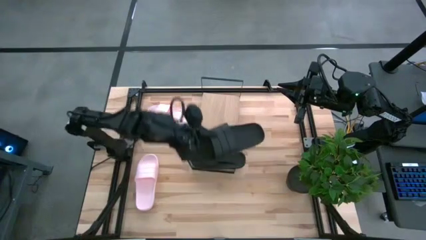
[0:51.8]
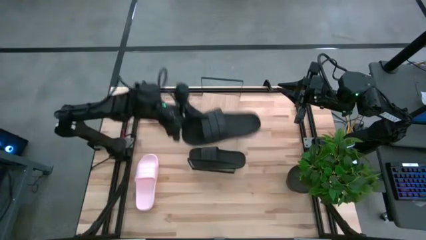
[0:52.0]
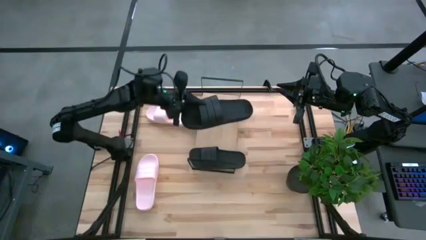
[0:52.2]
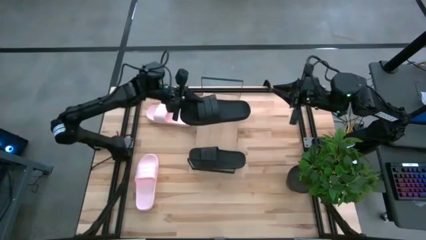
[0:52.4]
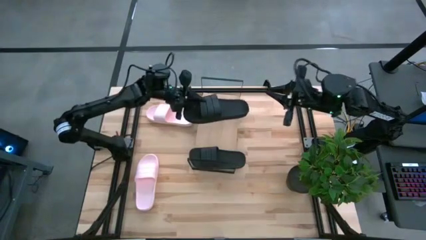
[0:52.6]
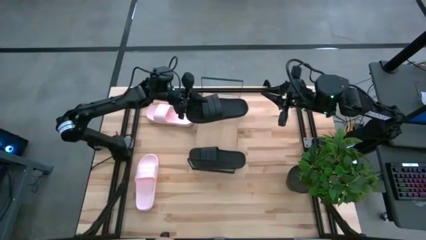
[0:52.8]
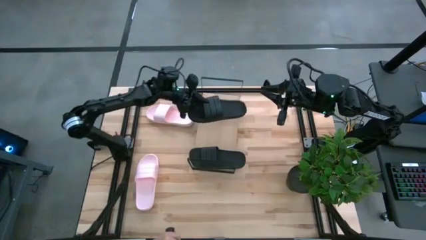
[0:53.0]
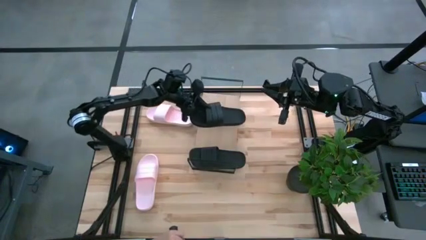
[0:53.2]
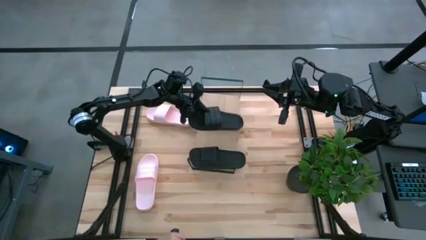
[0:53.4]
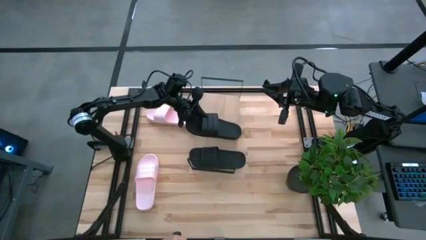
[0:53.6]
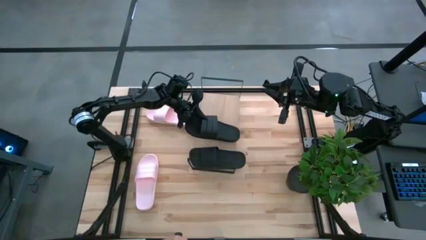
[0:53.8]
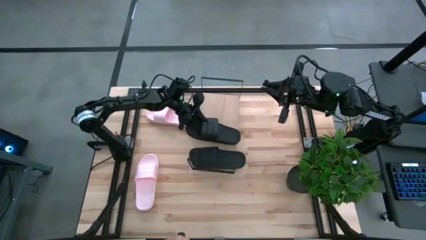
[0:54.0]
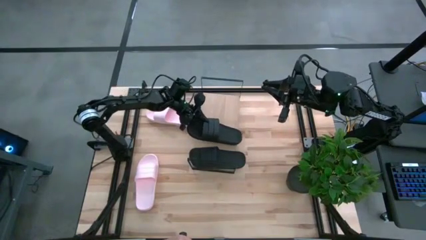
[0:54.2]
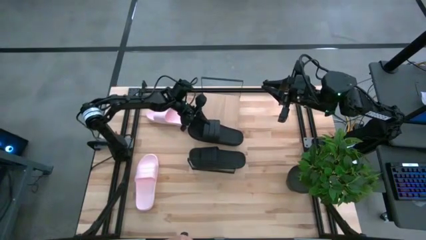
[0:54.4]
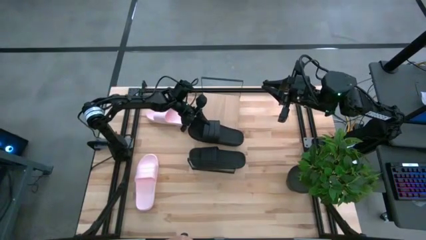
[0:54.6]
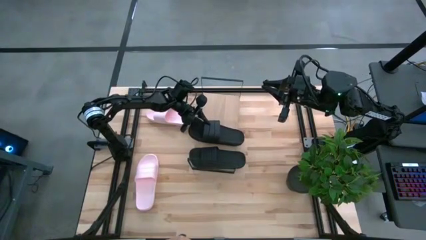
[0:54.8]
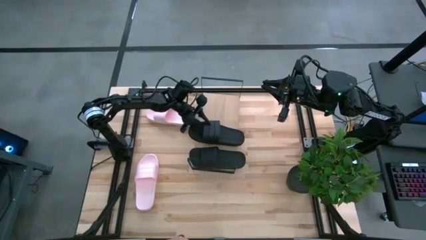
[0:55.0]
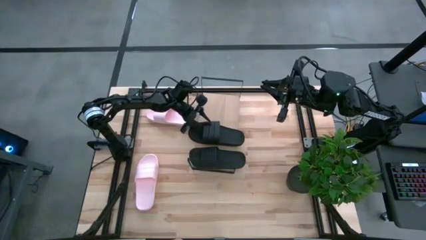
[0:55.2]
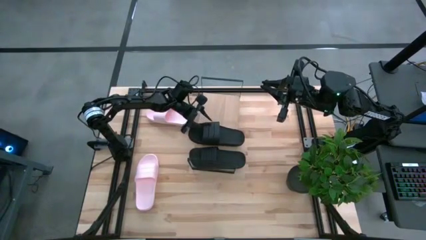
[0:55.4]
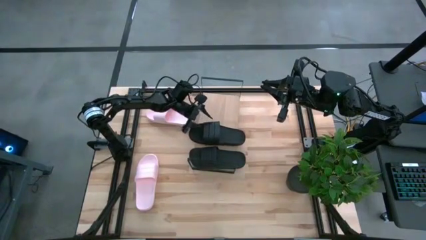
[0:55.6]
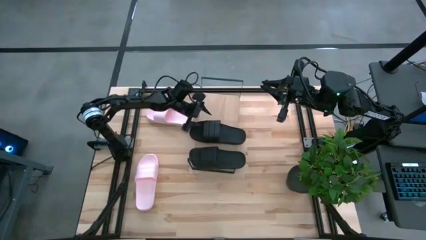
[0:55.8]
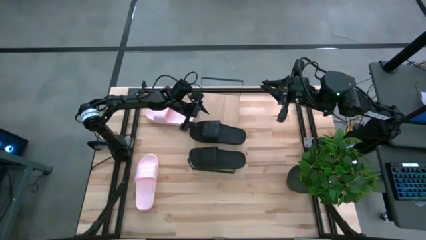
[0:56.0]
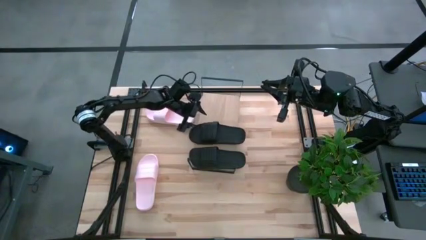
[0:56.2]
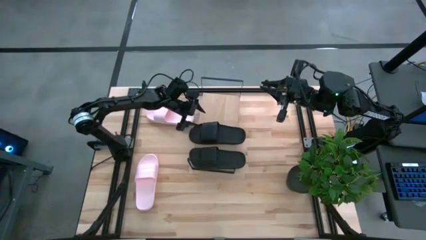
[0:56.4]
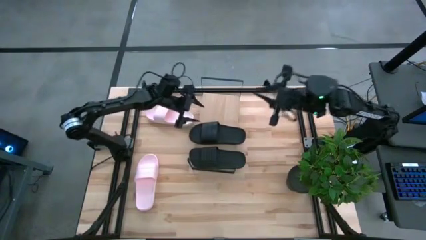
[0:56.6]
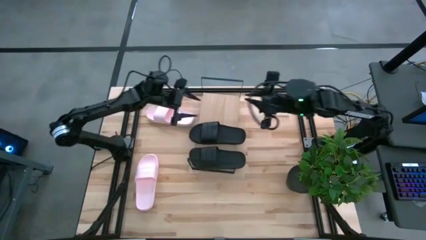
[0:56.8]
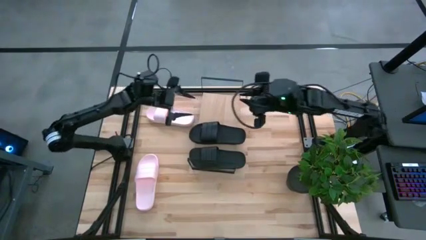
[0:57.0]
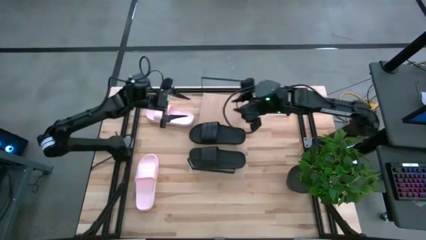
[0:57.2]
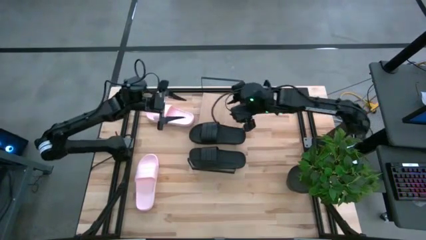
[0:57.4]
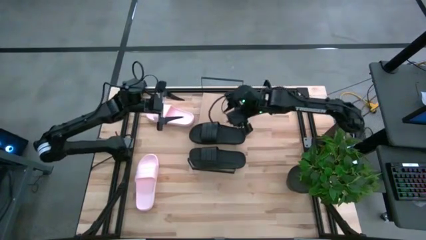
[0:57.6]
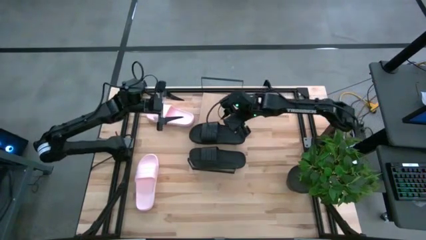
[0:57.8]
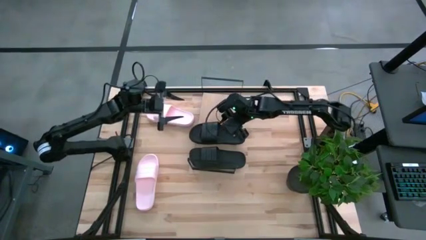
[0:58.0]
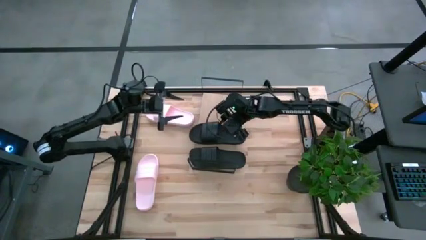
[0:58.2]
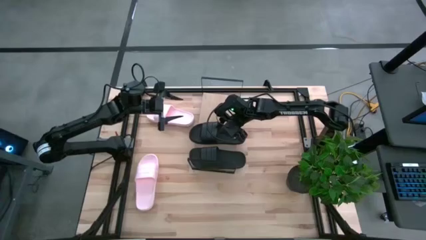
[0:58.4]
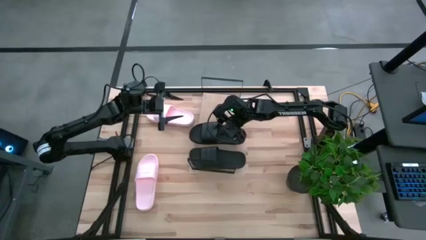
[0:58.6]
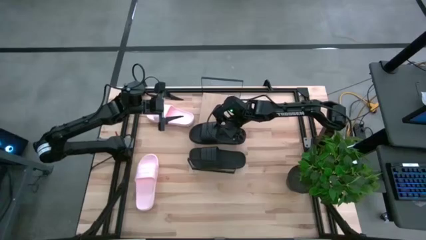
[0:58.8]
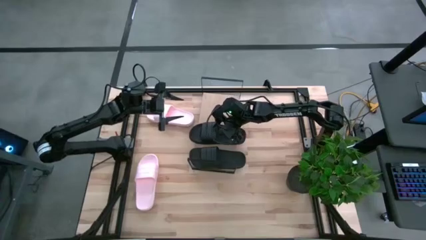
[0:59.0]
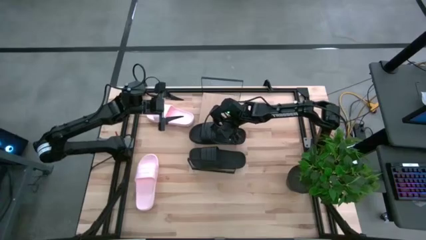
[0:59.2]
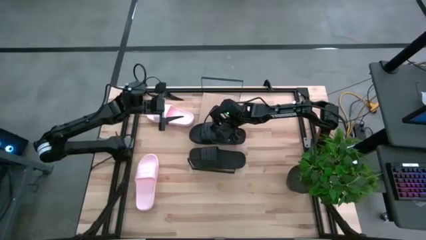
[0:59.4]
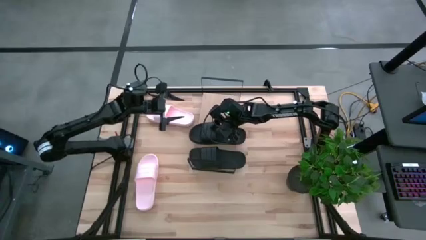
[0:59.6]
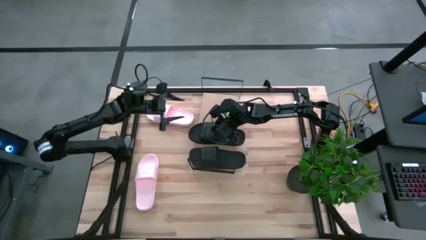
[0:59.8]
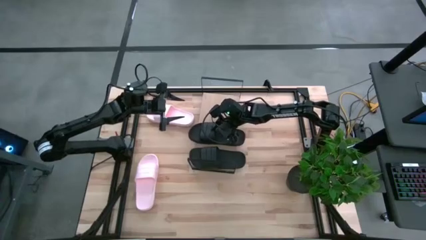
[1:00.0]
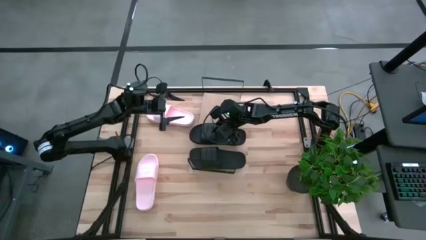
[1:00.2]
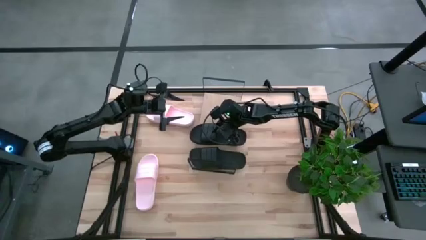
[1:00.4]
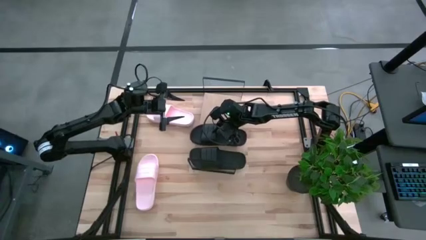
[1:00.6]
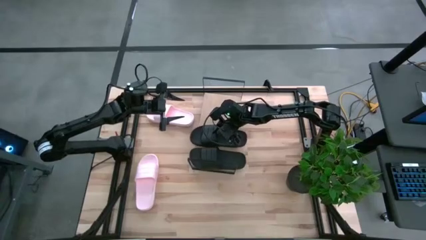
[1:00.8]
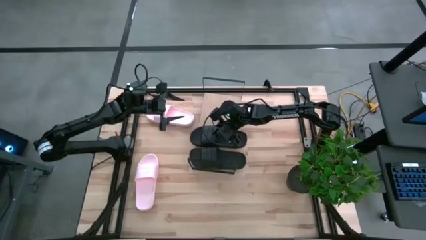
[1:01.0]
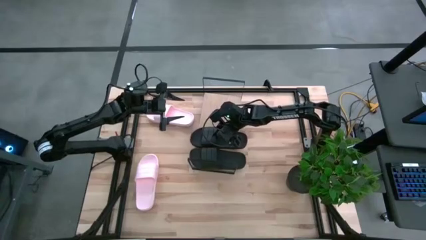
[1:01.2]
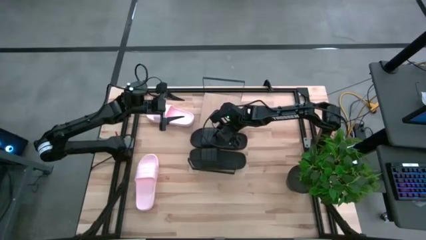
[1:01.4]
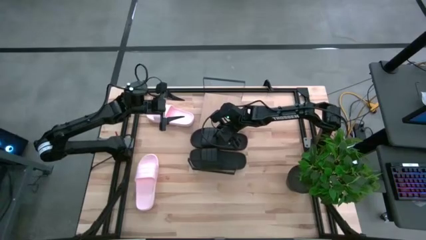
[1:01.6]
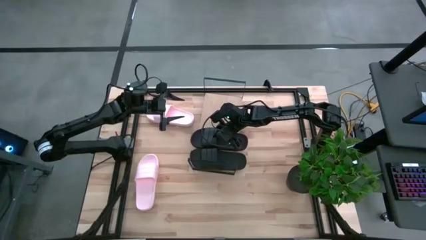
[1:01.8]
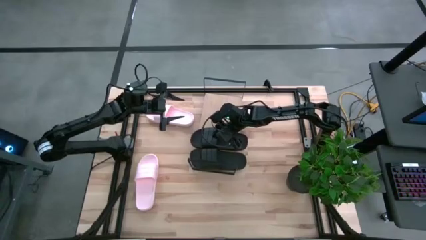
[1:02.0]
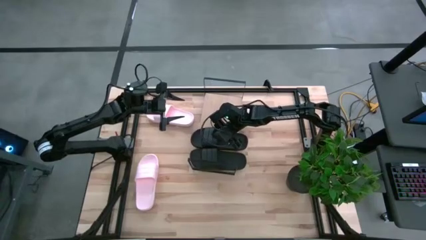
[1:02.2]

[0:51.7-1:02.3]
Task: Pick and place slides into the shelf
Put the black slides on the shelf
